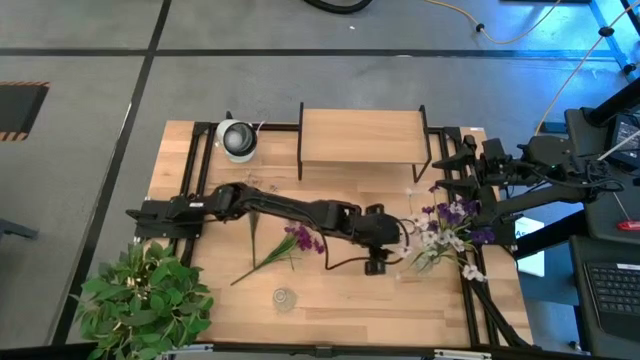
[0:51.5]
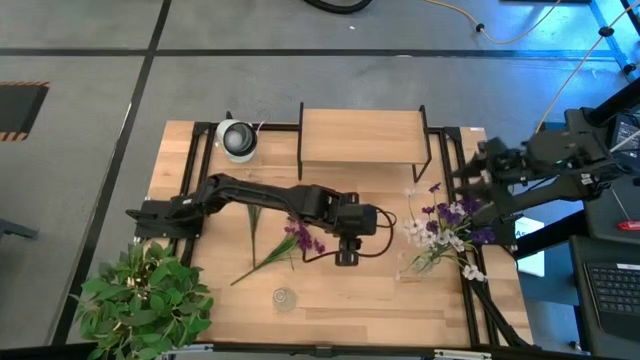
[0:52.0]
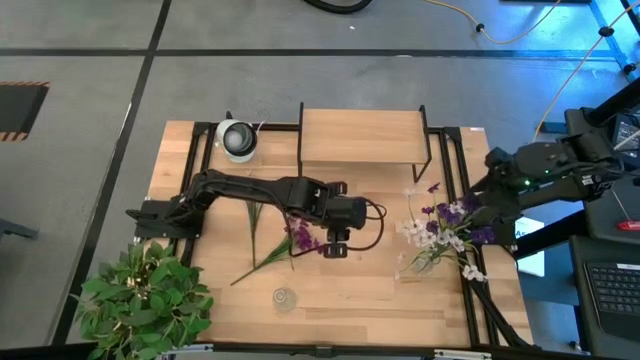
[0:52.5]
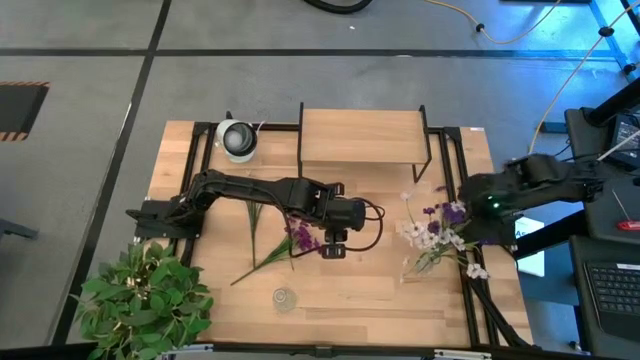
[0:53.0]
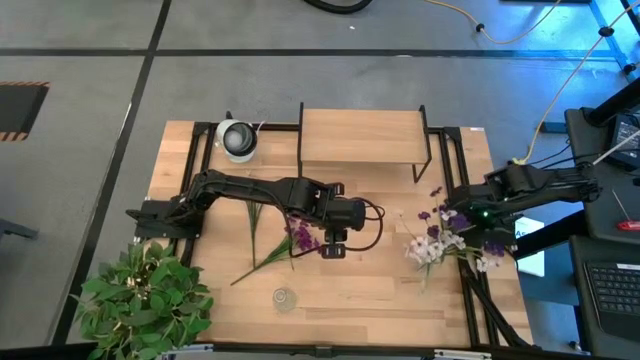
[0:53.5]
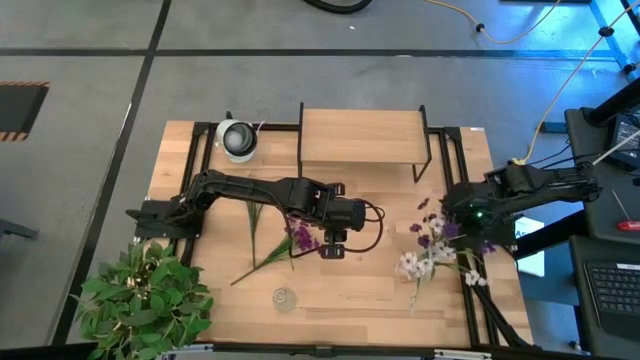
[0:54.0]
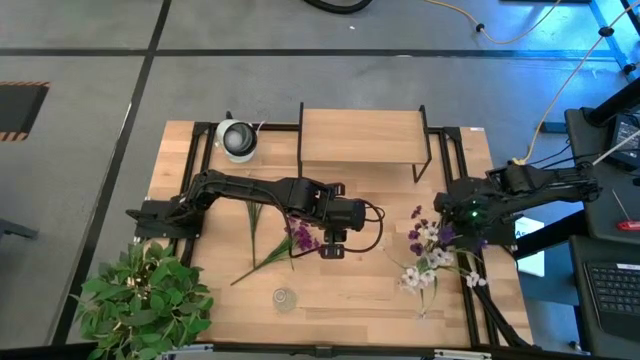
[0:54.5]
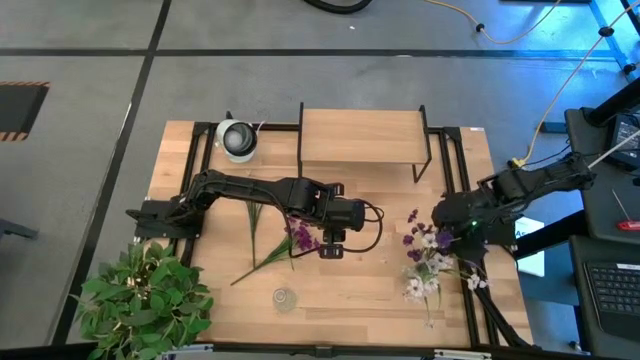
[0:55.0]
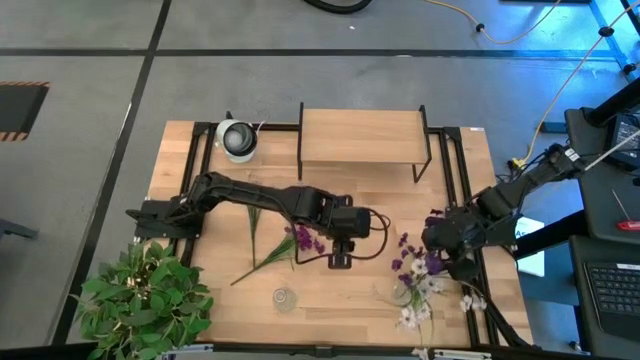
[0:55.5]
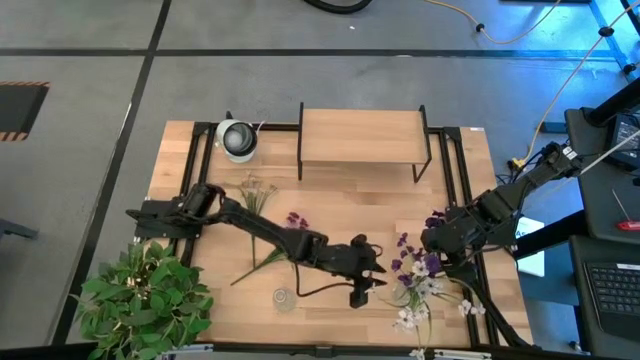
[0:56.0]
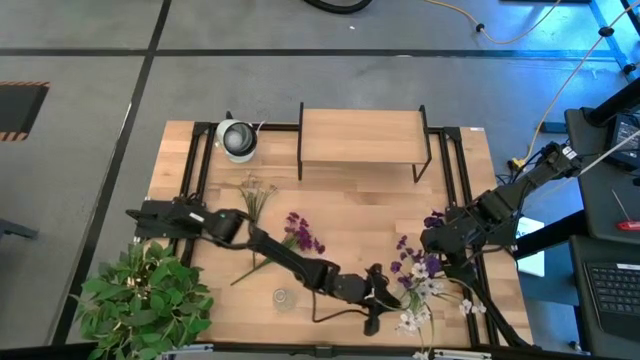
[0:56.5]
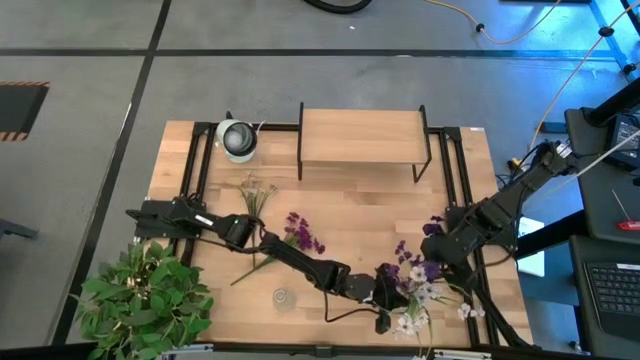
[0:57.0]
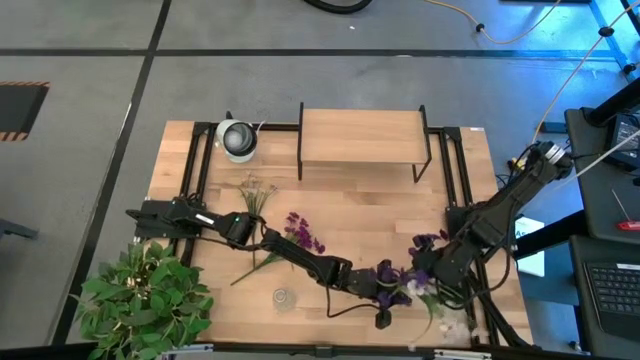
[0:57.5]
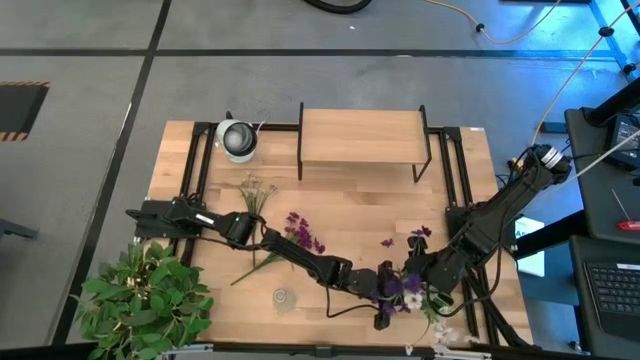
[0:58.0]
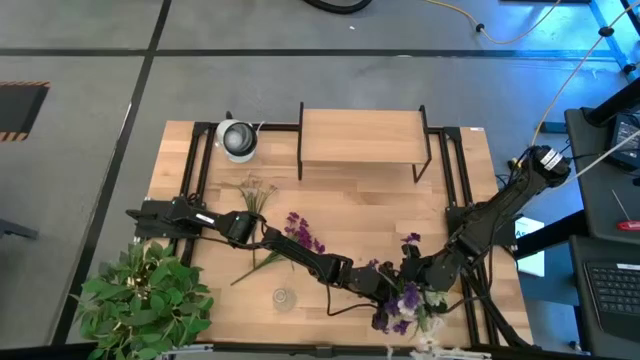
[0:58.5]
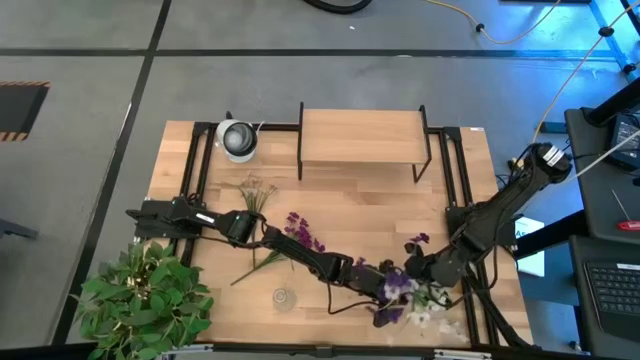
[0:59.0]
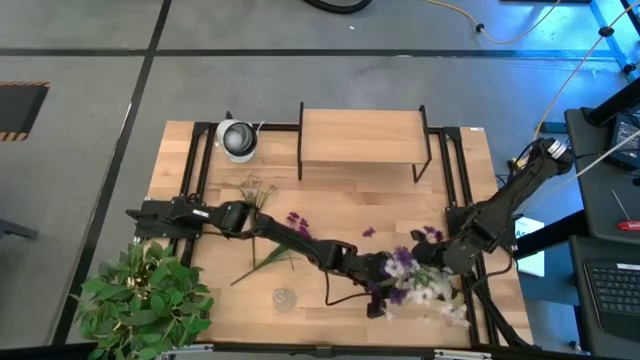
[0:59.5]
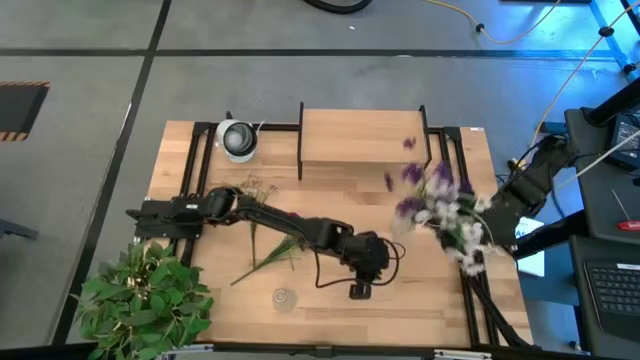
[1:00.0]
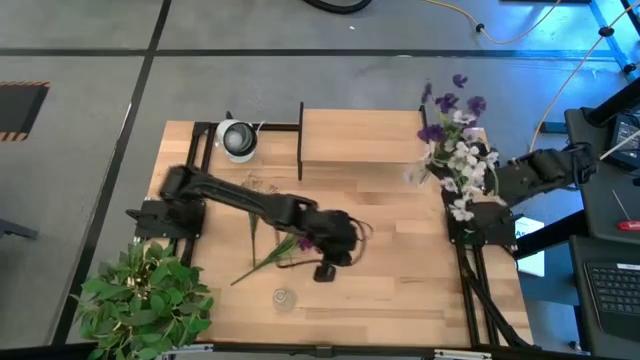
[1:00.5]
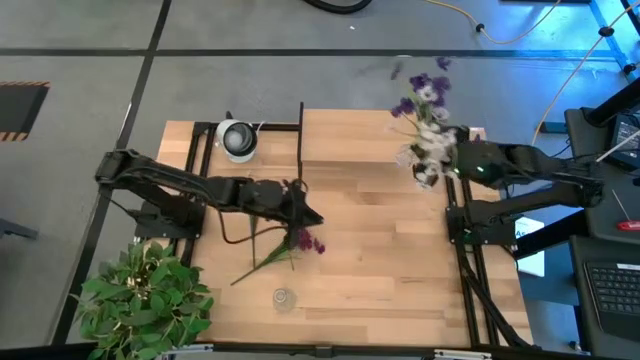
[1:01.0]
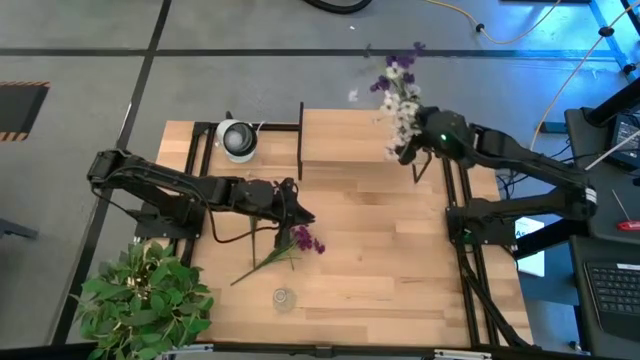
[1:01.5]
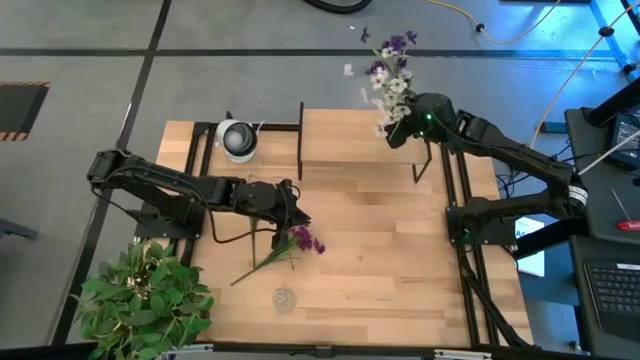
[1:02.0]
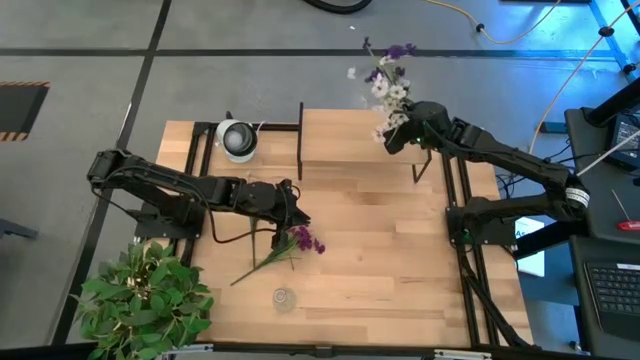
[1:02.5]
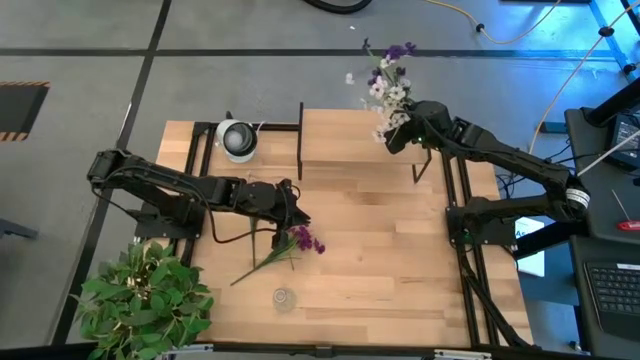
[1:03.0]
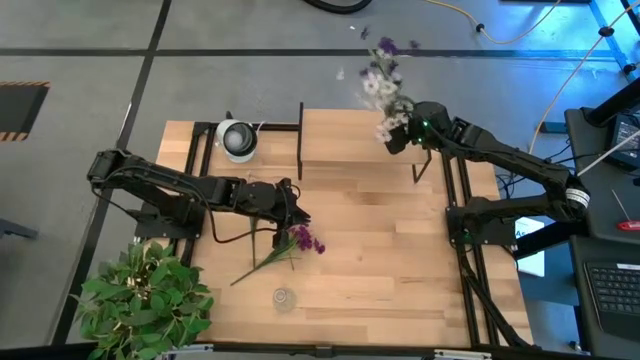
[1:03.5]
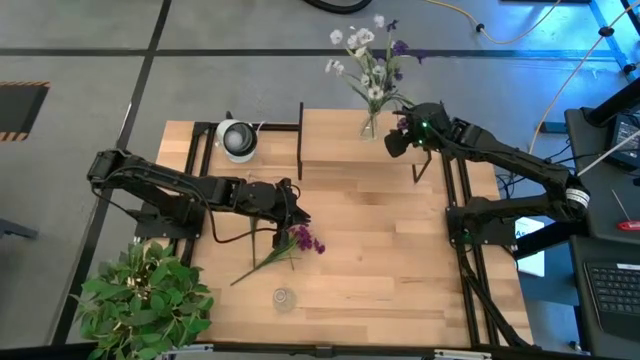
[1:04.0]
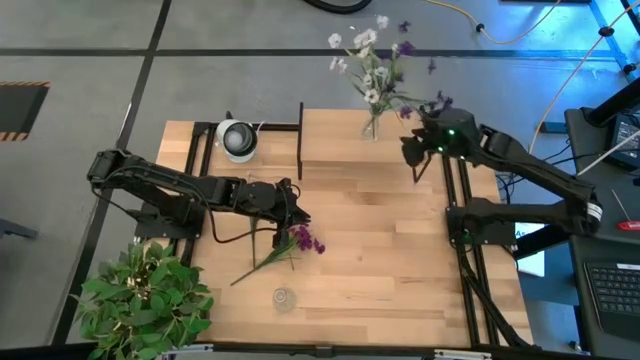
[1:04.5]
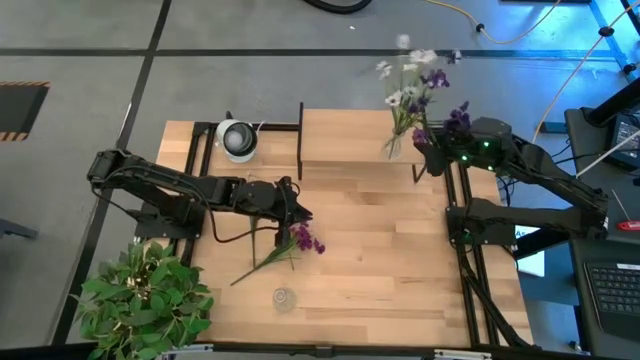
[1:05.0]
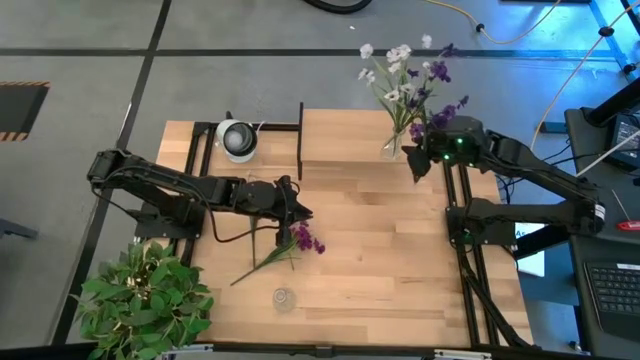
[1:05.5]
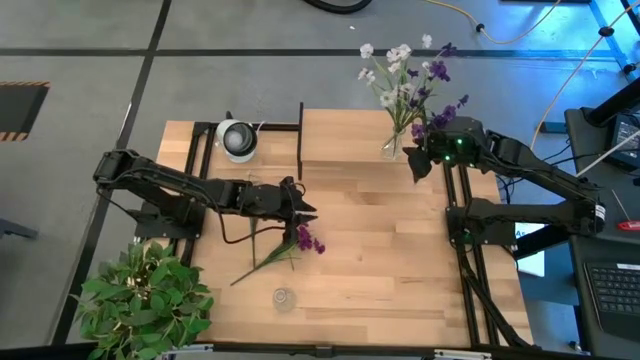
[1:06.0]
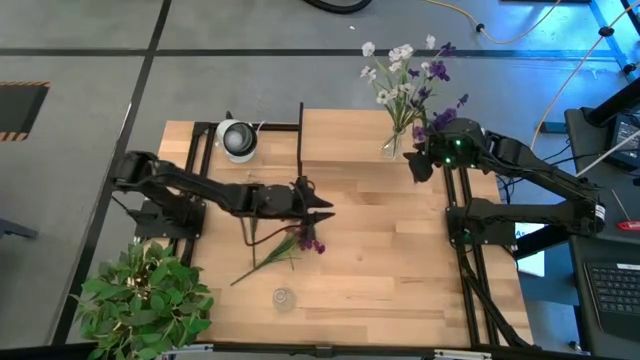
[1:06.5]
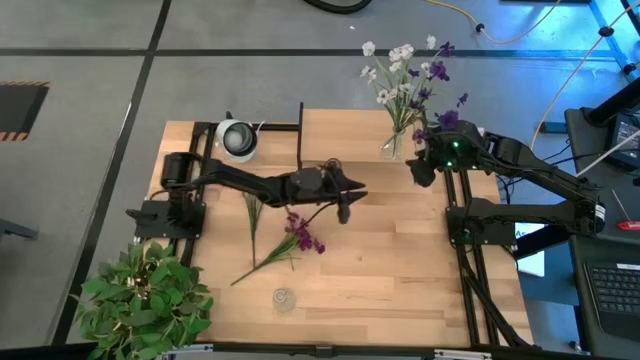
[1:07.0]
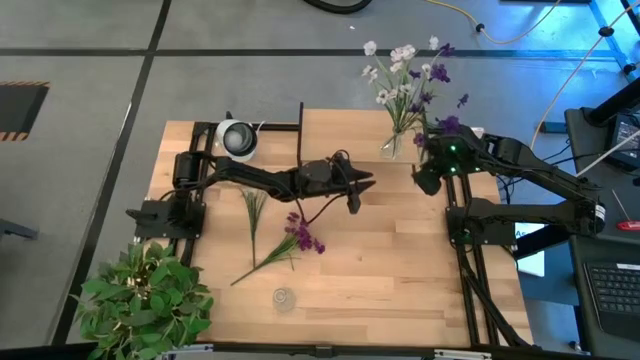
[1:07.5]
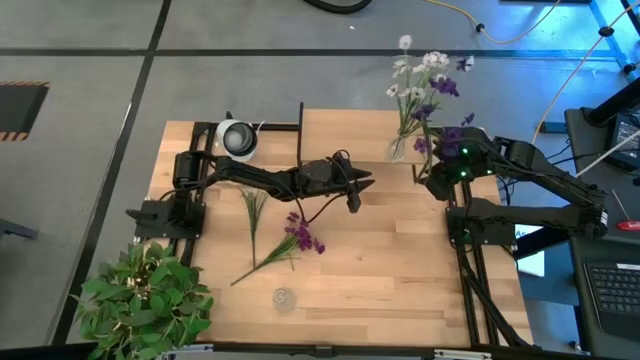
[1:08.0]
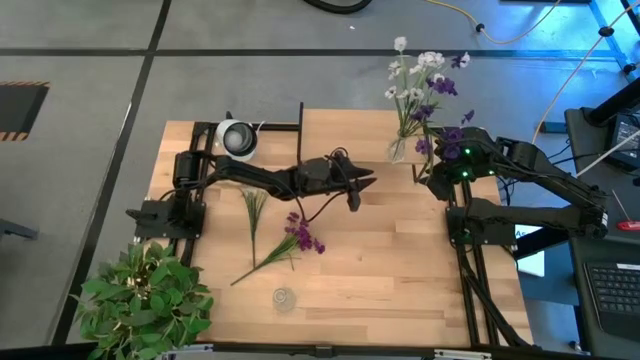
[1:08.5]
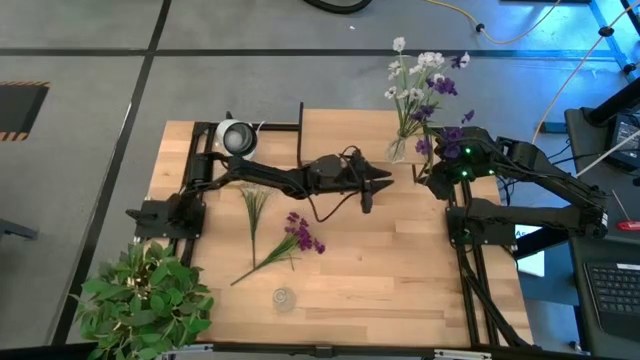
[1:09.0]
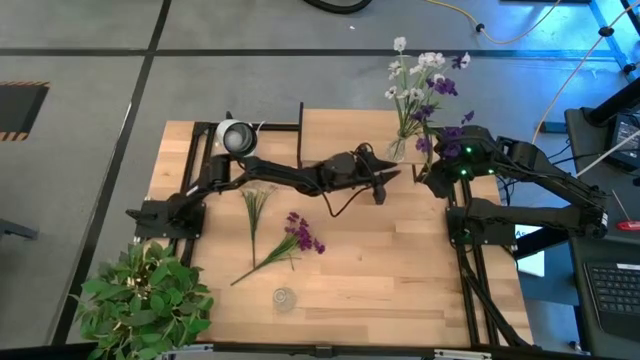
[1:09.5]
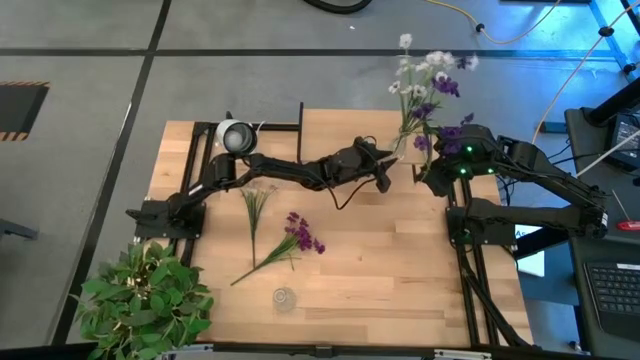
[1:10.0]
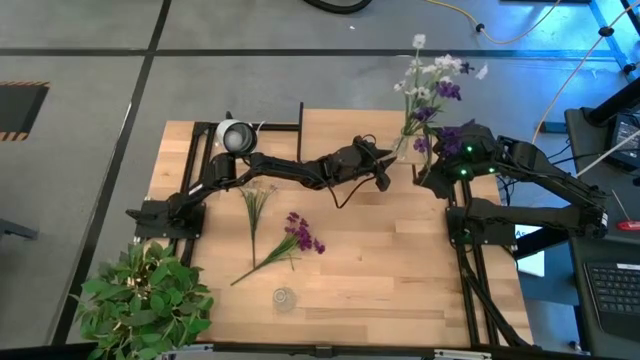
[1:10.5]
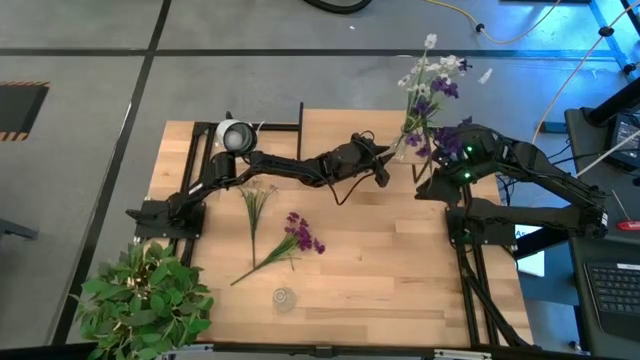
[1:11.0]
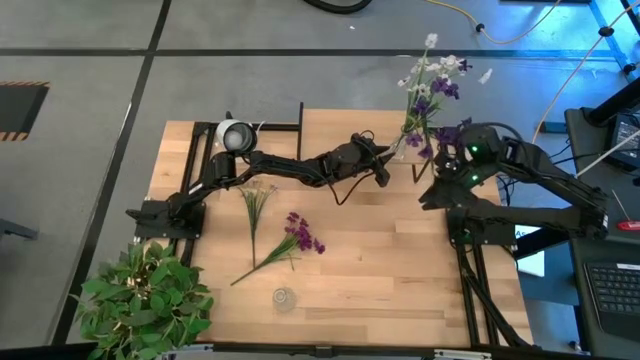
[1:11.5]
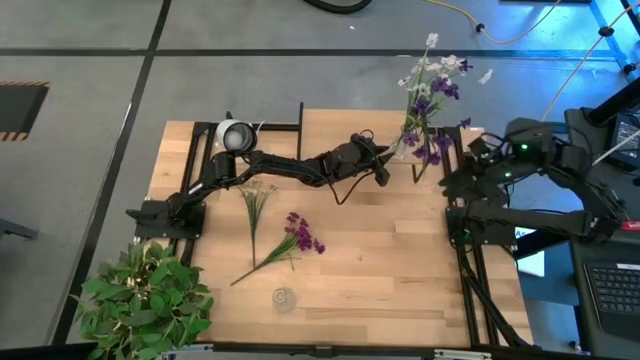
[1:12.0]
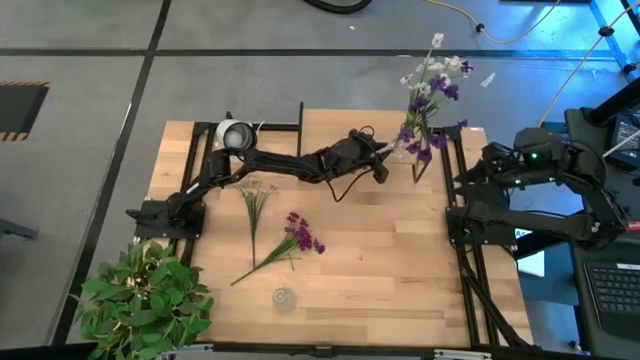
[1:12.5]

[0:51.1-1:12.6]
Task: Pick and place flowers into a vace then onto a shelf
Put the right transparent vase on the shelf
